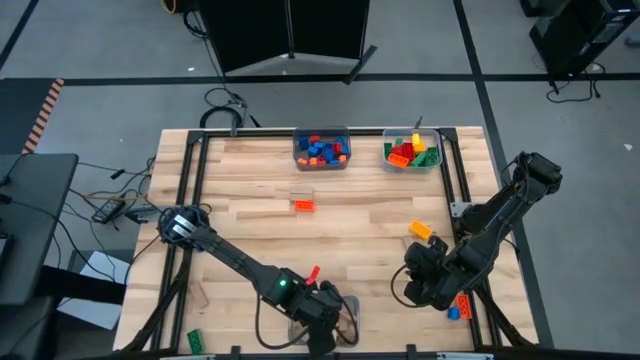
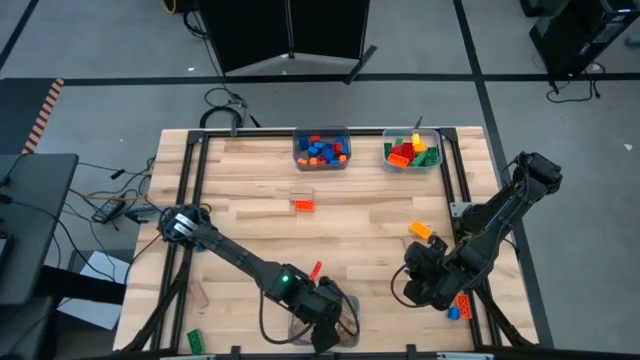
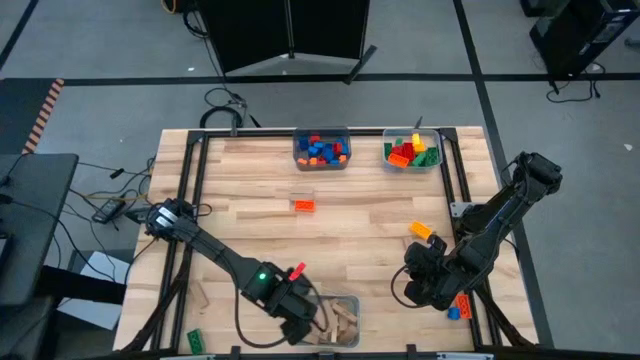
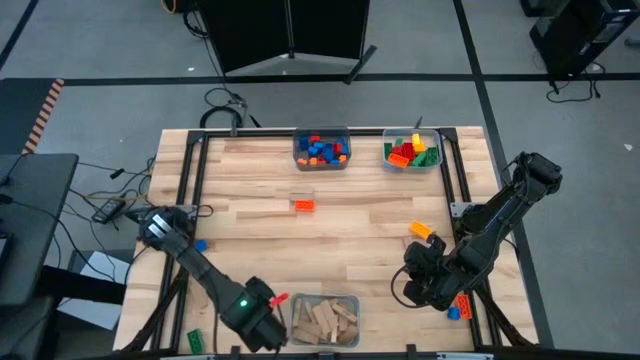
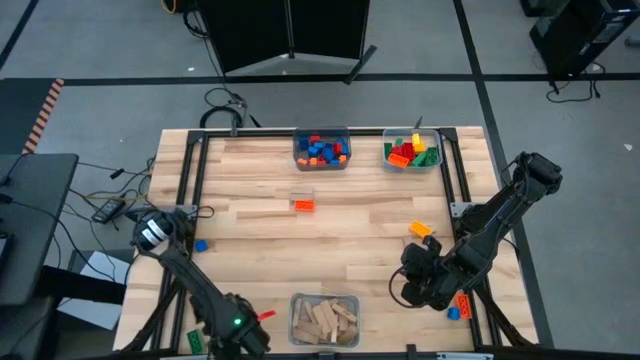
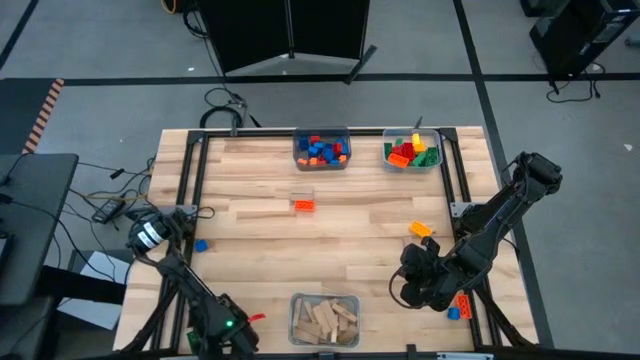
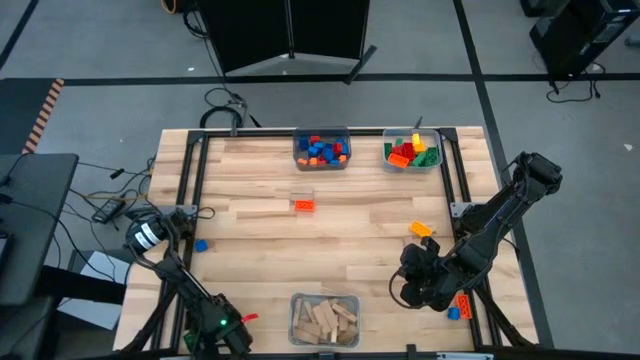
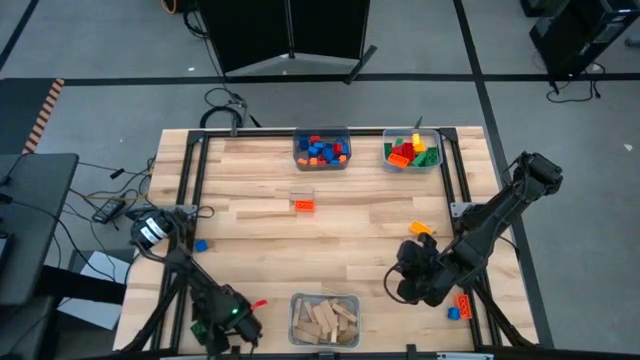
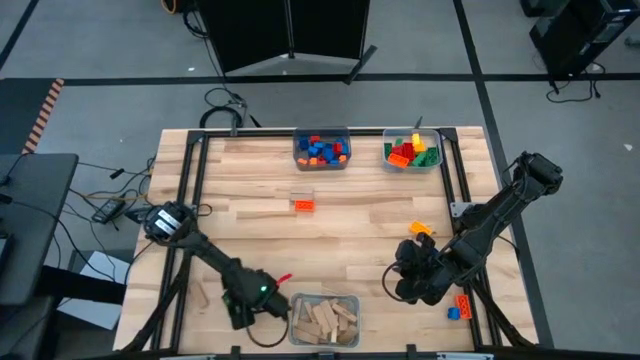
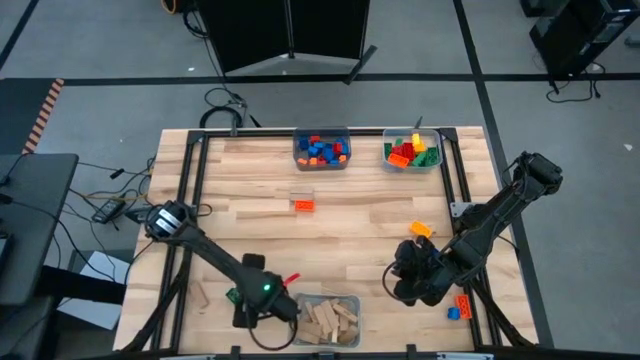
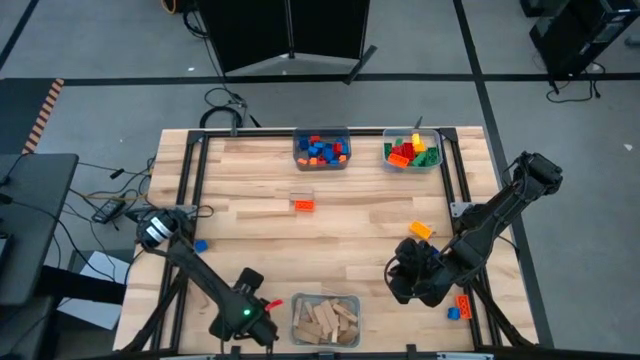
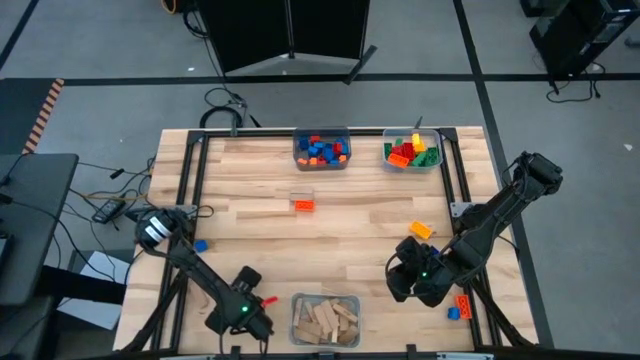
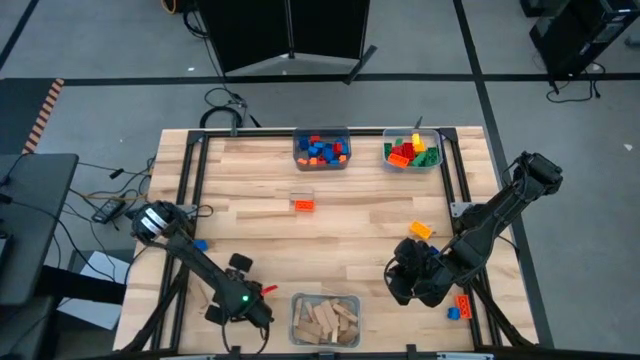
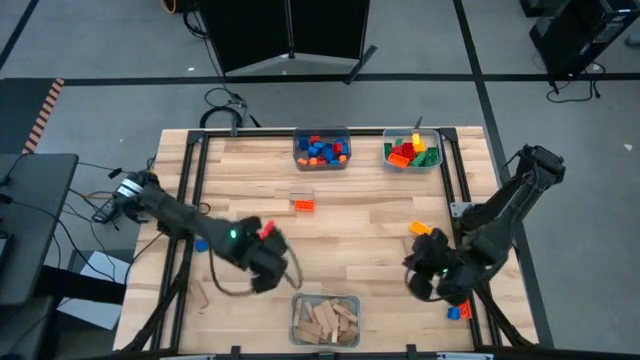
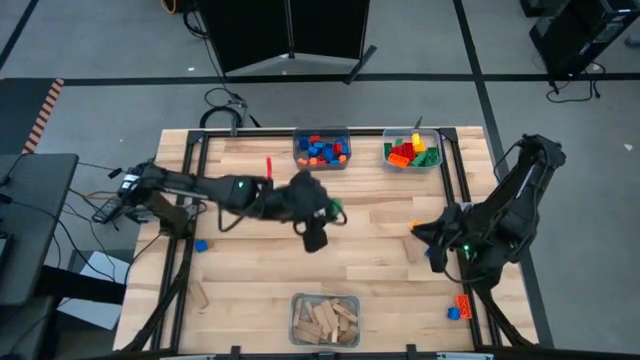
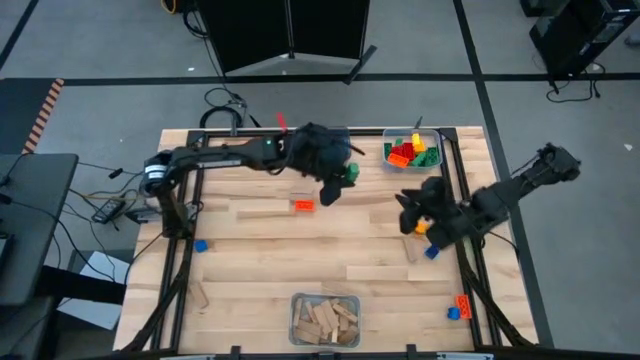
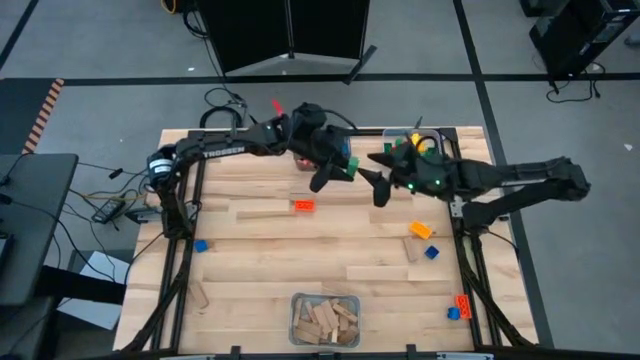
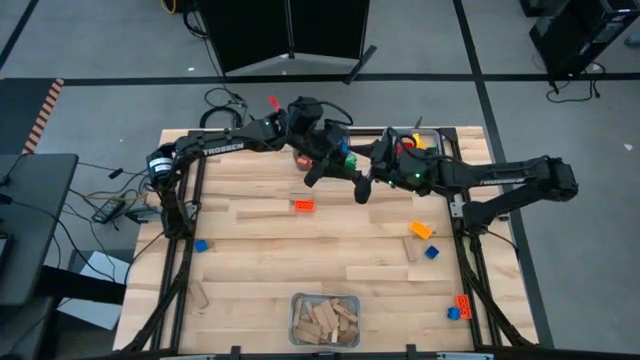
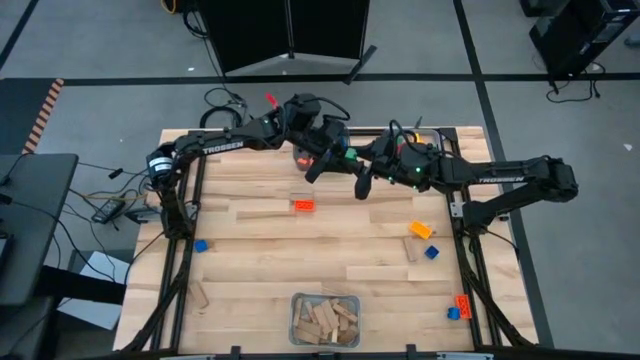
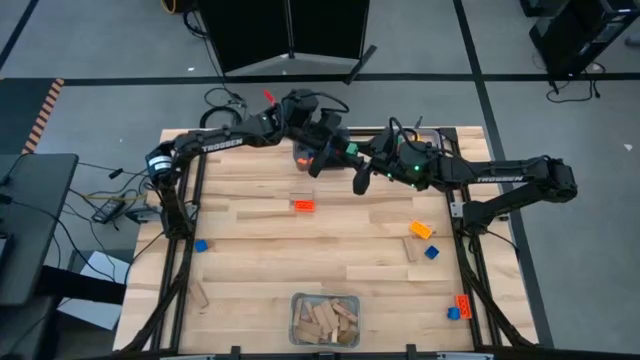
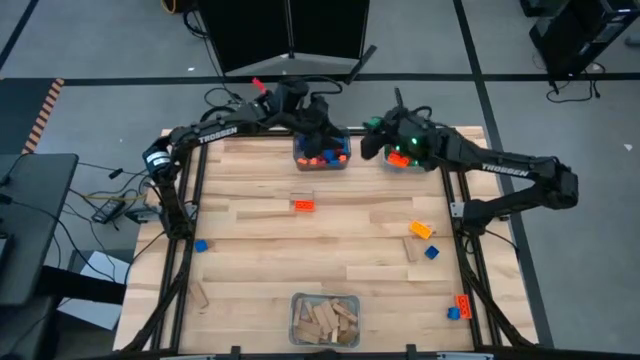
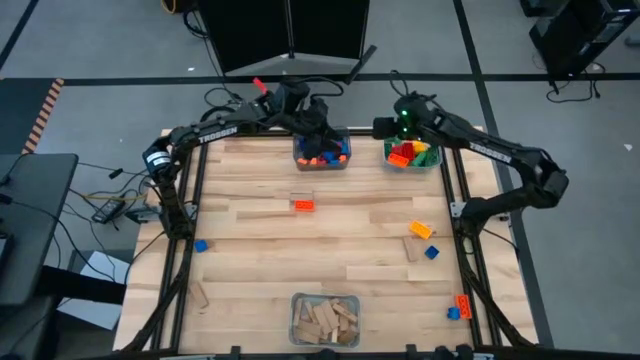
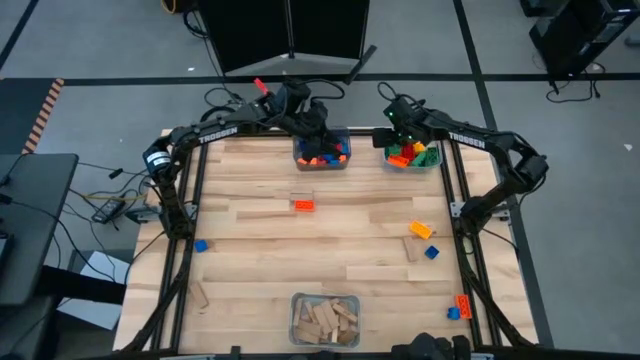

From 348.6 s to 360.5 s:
Task: Sort blocks by size
Put the large green game piece into the transparent bin

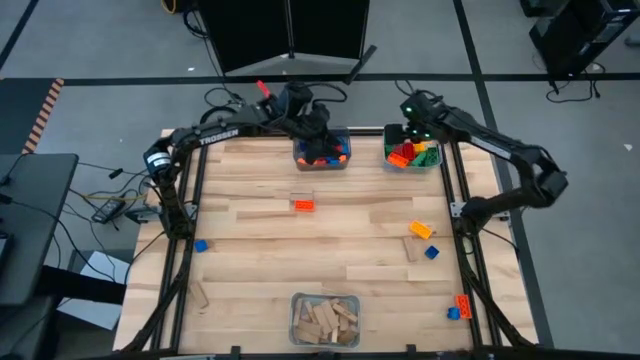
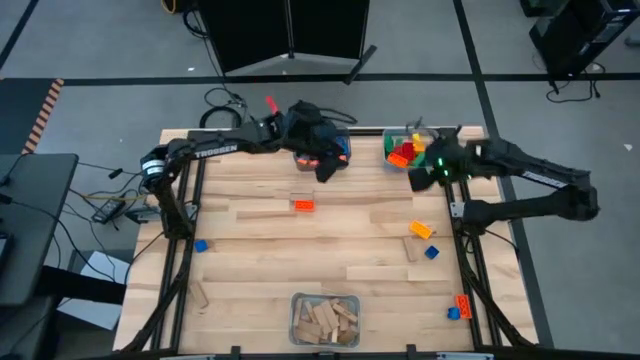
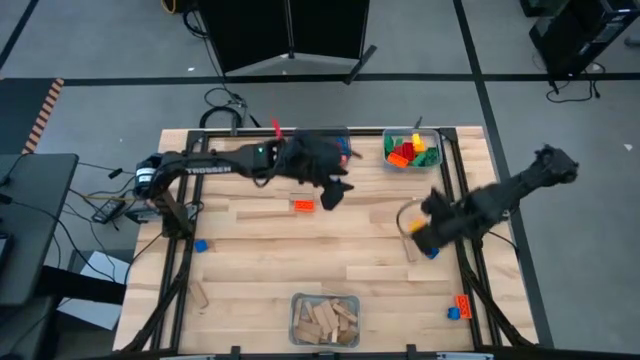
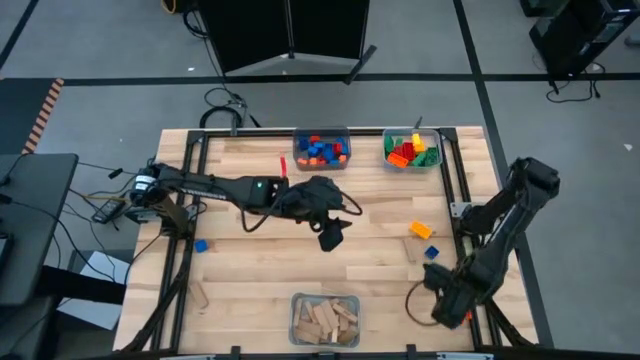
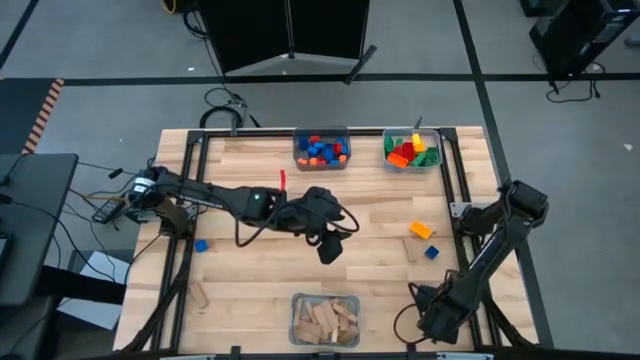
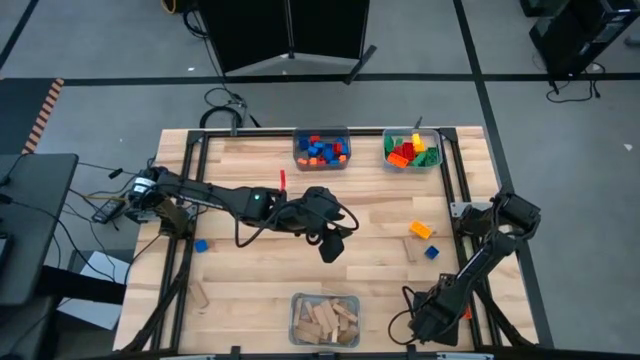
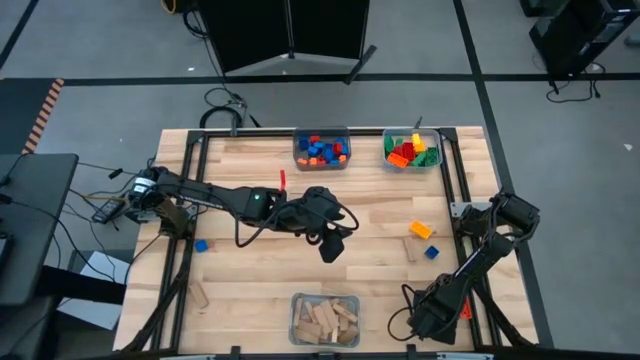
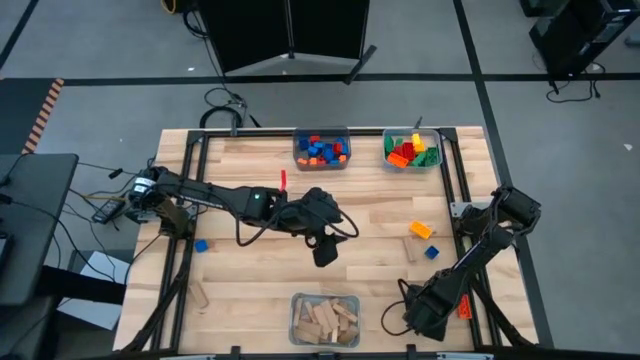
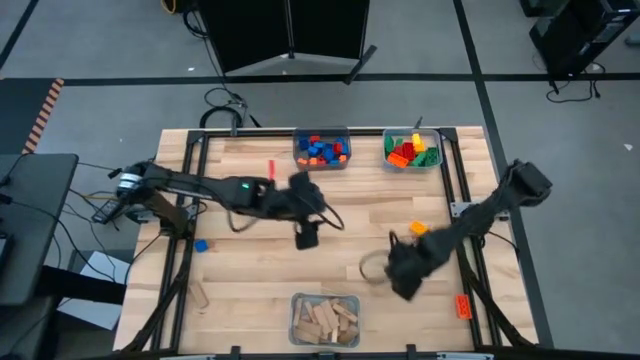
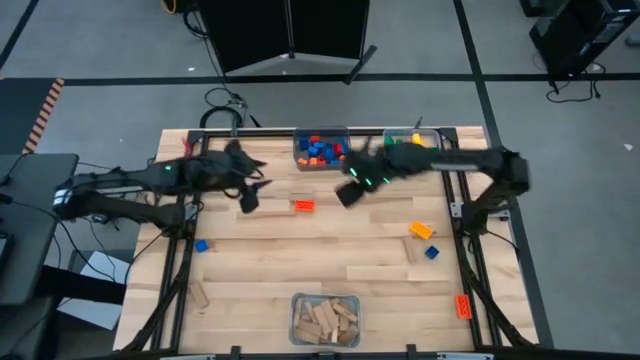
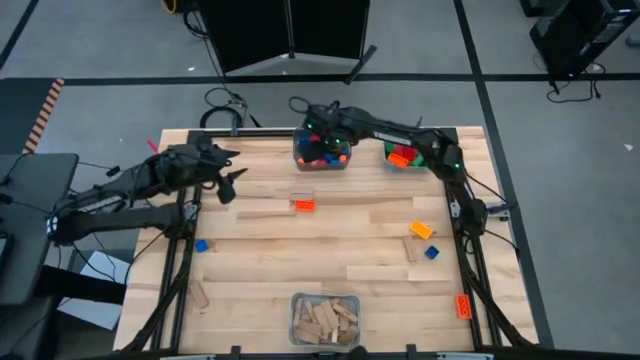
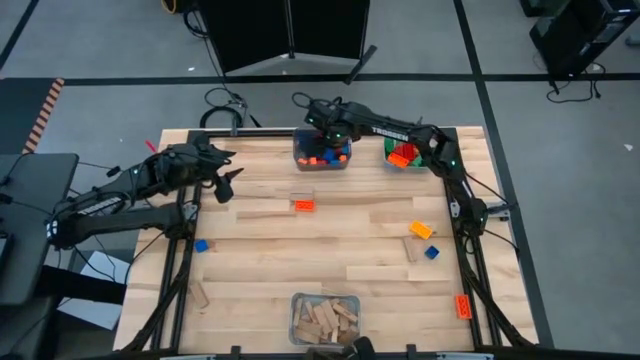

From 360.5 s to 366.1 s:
Put the small blue game piece into the black bin

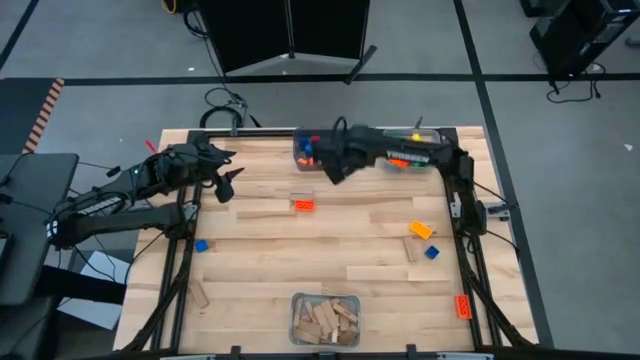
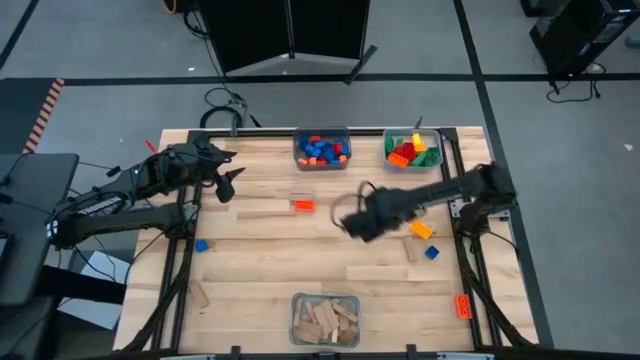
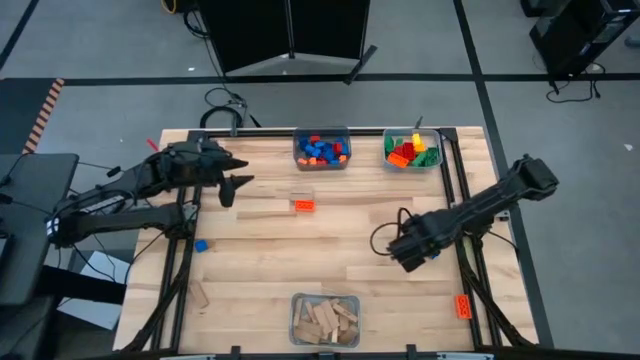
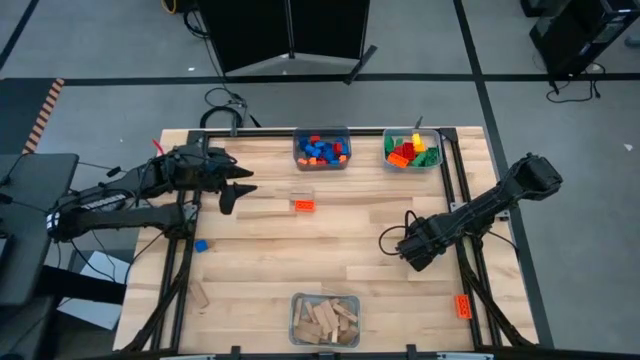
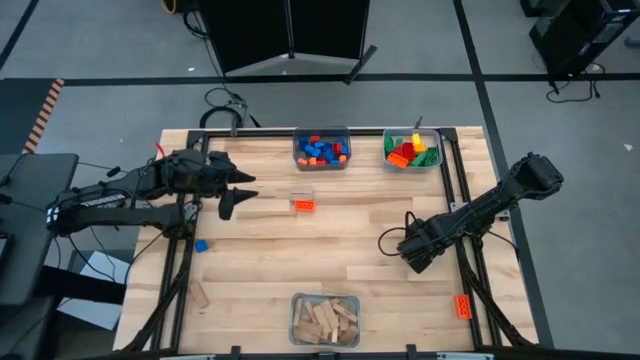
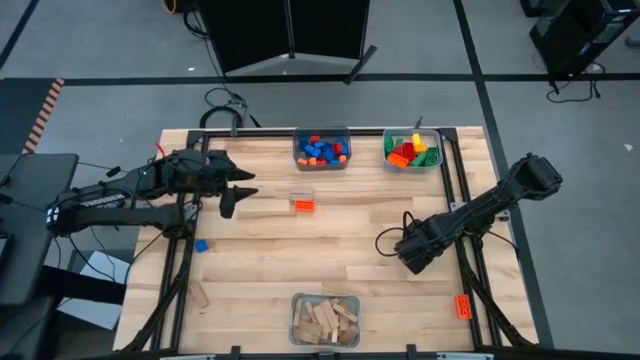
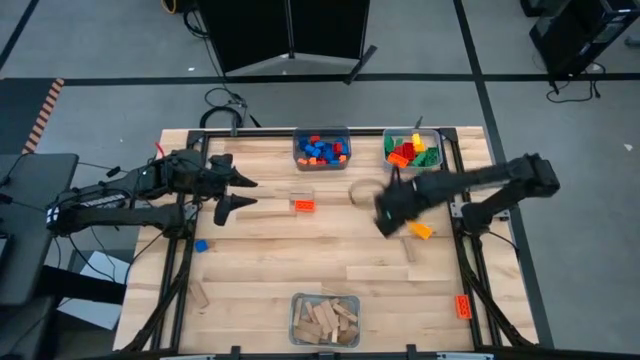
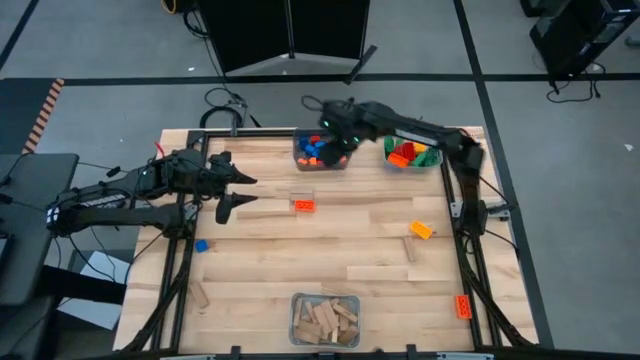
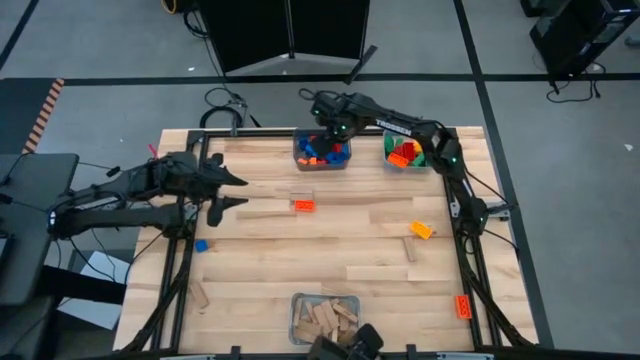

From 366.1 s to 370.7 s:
Put the small blue game piece into the black bin
